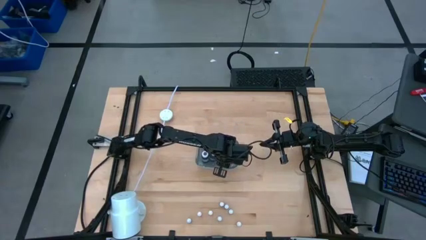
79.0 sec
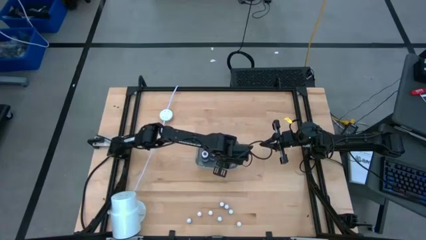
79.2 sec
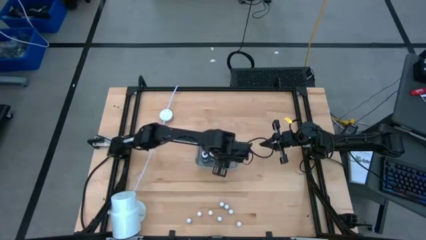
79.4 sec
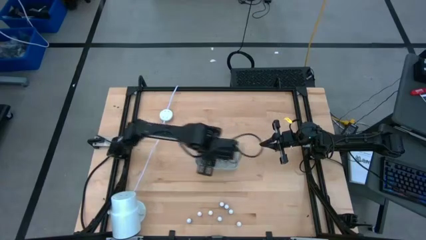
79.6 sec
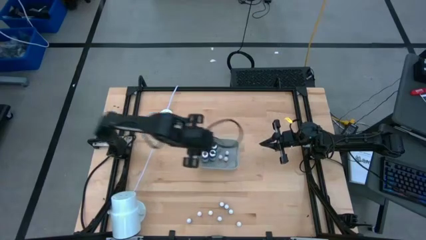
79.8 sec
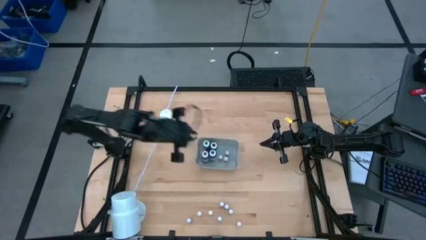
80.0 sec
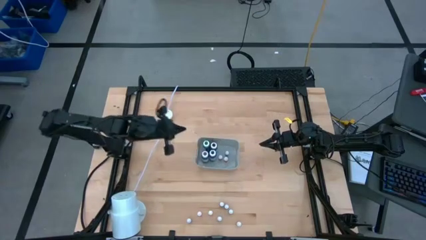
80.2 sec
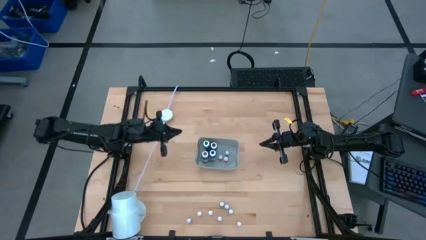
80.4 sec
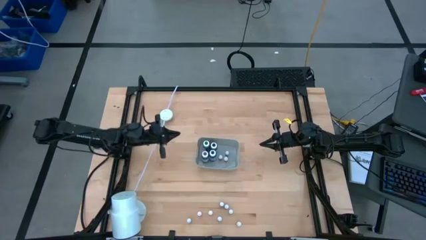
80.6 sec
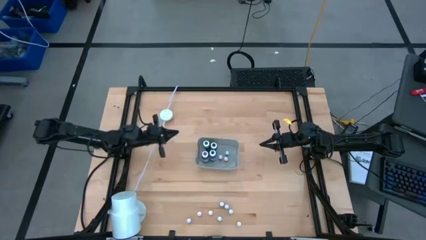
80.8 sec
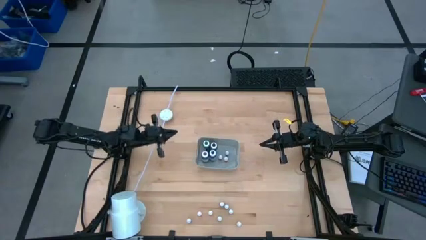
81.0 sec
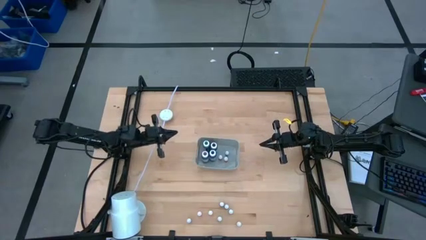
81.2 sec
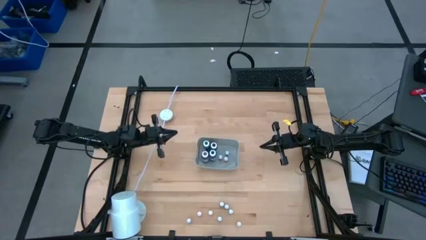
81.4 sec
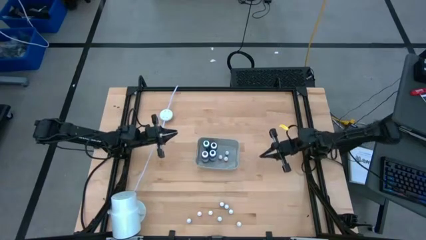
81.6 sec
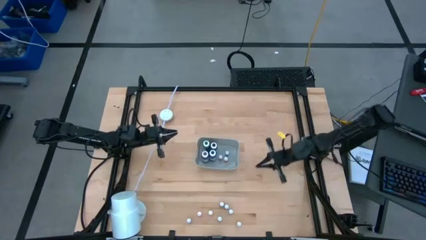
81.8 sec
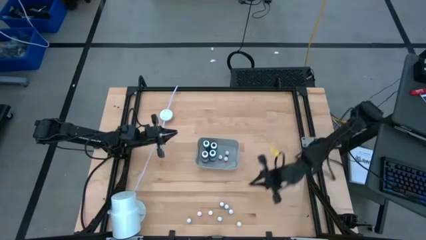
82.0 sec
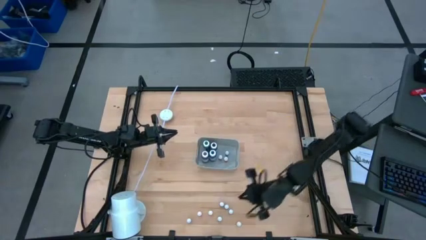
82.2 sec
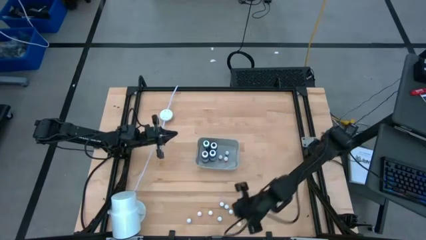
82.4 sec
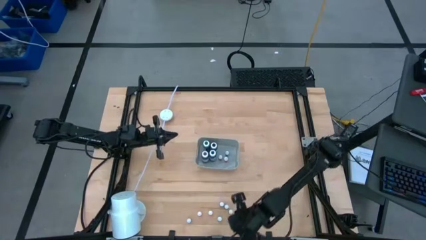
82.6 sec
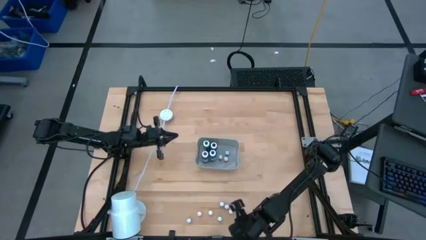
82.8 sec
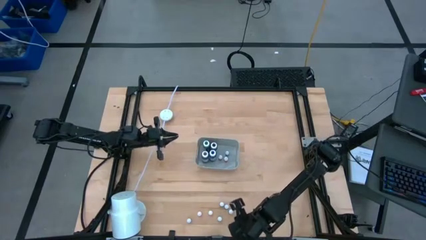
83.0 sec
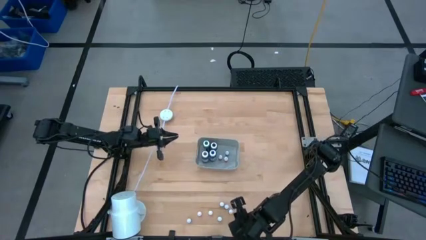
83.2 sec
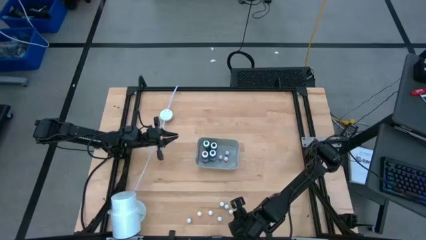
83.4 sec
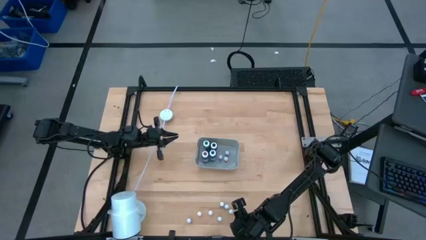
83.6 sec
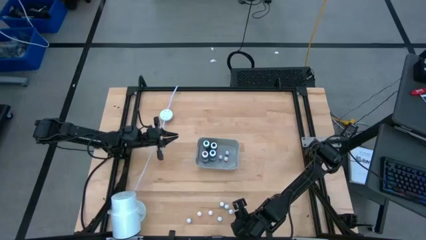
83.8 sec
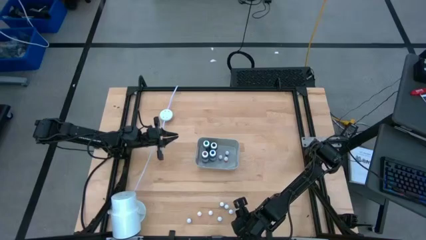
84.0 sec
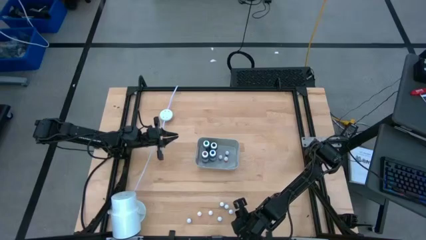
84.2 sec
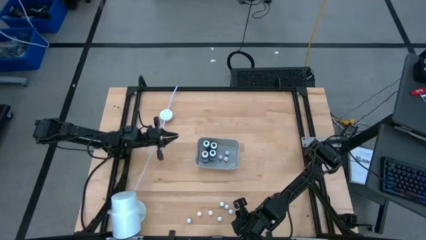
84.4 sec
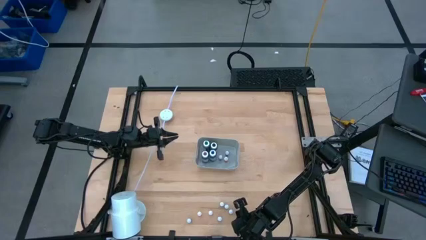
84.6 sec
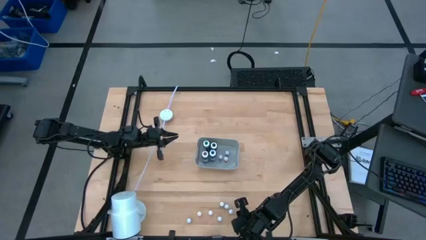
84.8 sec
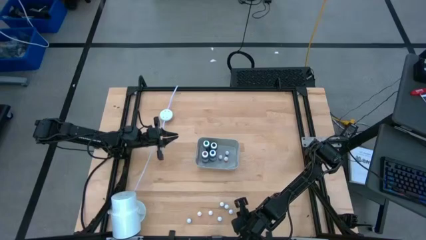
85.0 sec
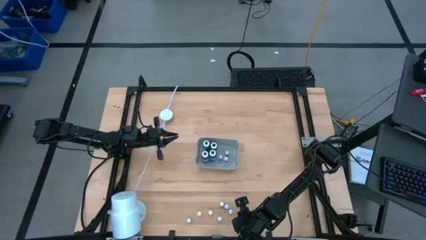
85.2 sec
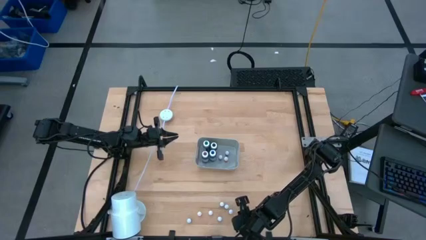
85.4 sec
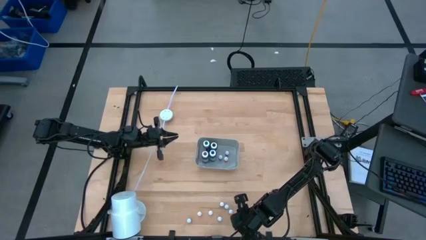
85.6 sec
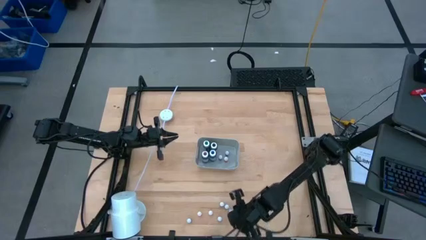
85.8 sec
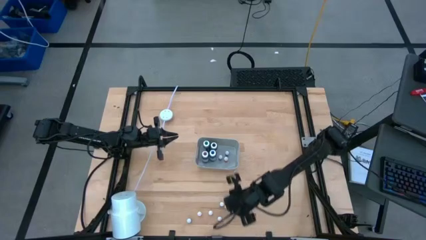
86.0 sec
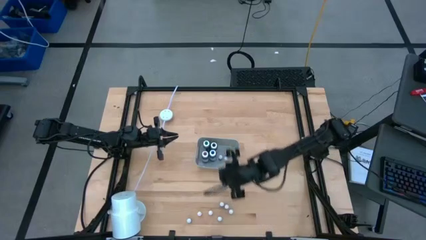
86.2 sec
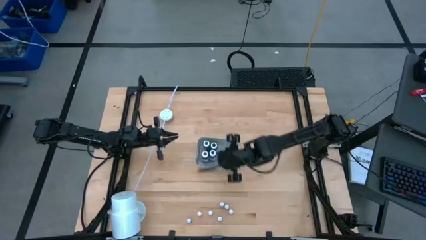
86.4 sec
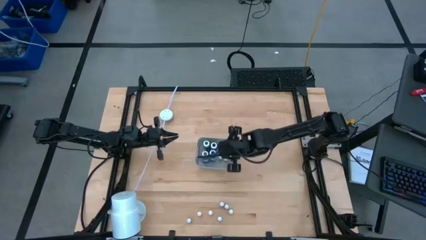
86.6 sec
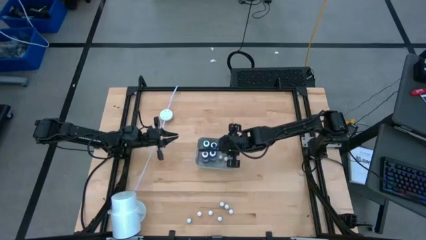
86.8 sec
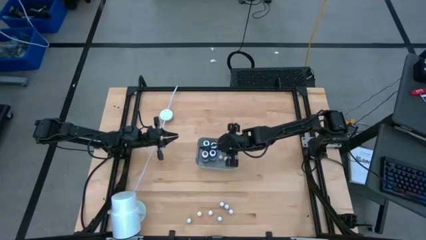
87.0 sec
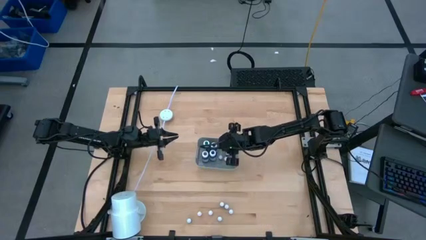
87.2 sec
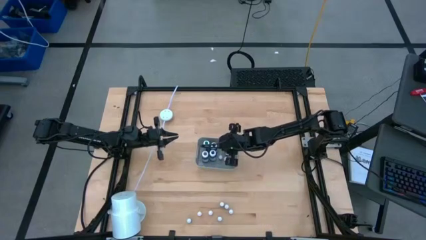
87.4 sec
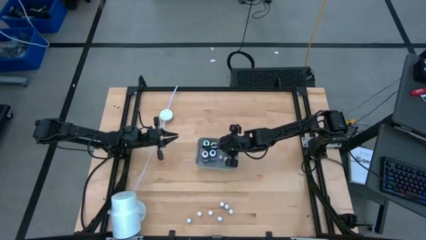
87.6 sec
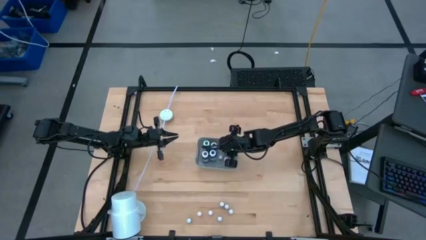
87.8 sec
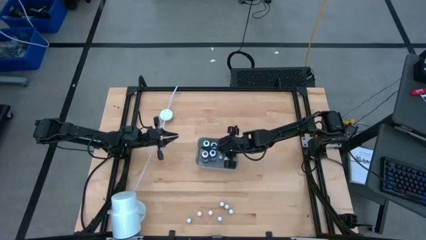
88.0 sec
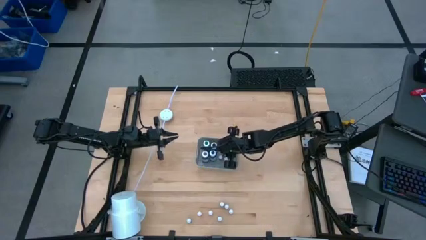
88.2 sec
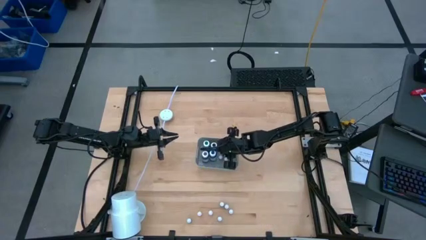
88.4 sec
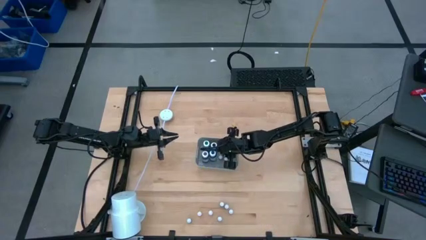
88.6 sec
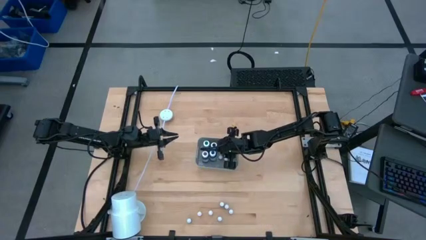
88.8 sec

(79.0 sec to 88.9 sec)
Task: Pick & Place food coloring
Put the small orange food coloring bottle into the gray container

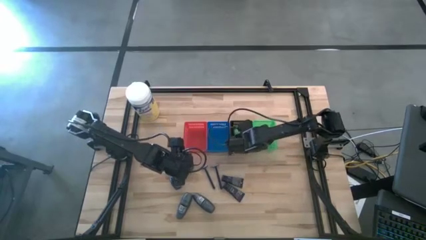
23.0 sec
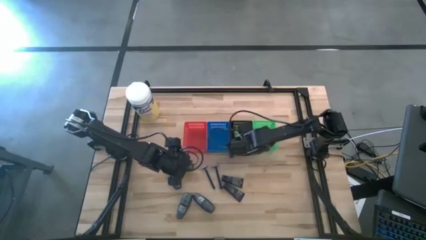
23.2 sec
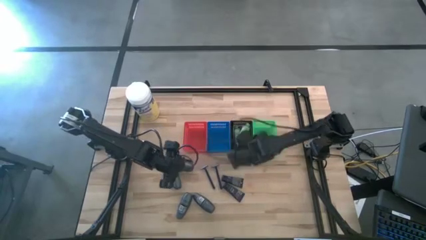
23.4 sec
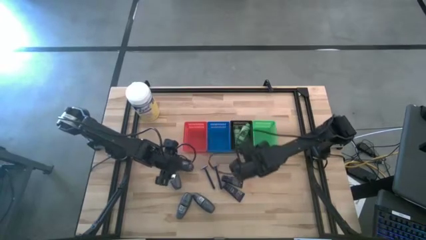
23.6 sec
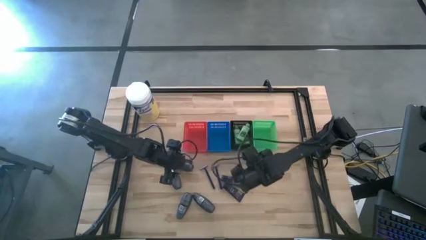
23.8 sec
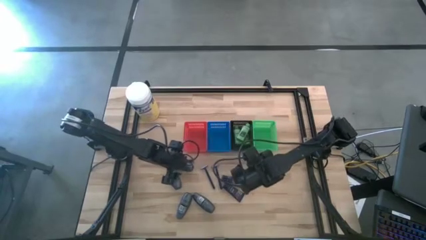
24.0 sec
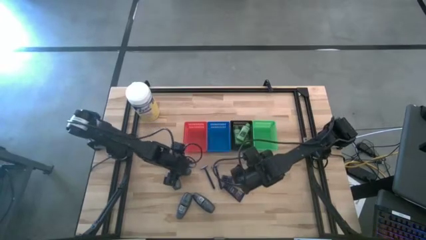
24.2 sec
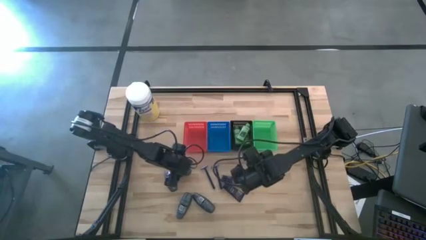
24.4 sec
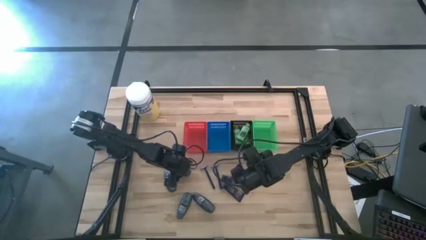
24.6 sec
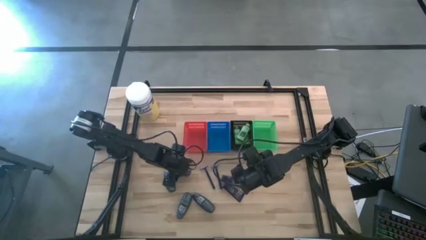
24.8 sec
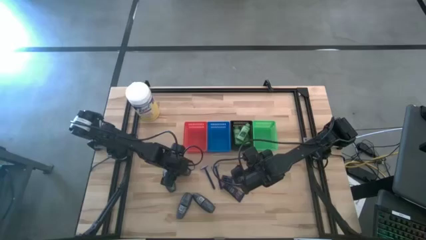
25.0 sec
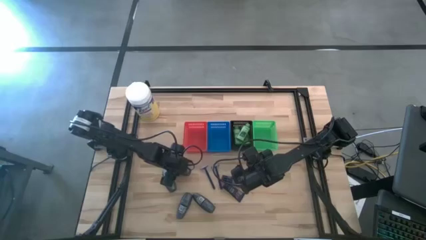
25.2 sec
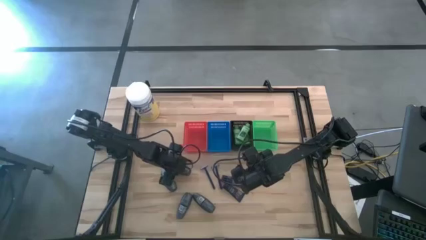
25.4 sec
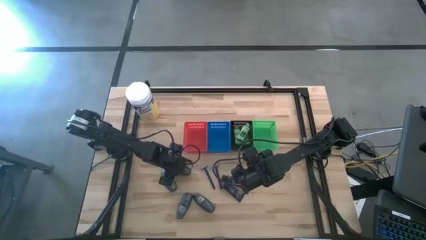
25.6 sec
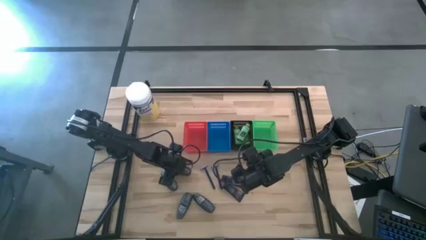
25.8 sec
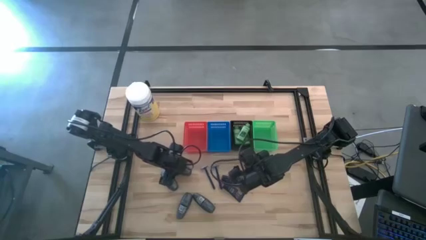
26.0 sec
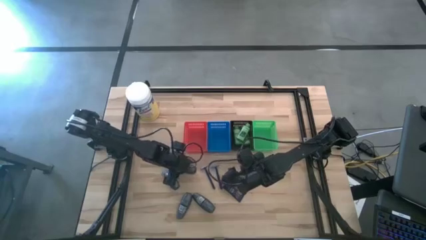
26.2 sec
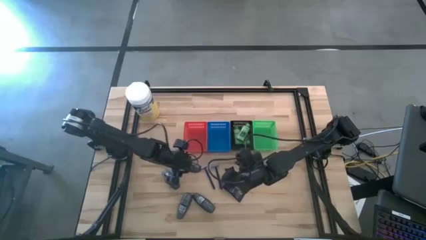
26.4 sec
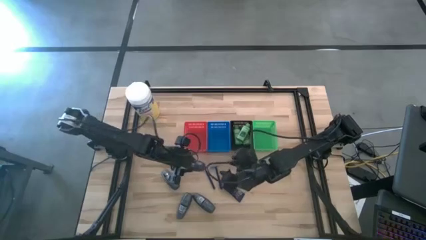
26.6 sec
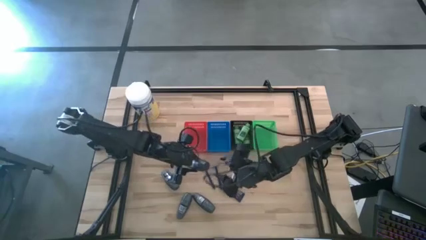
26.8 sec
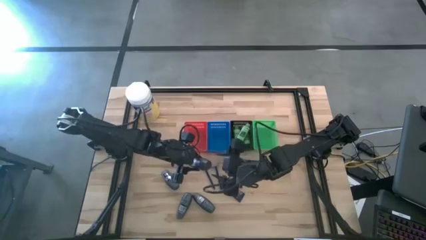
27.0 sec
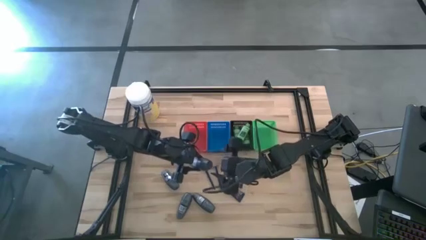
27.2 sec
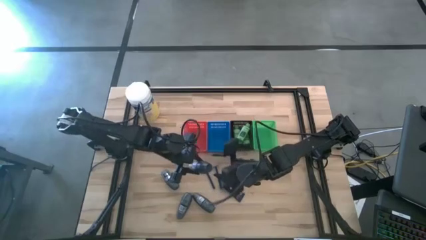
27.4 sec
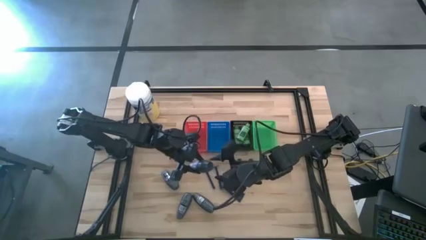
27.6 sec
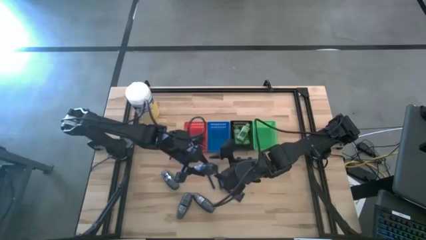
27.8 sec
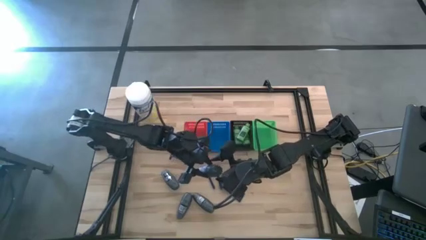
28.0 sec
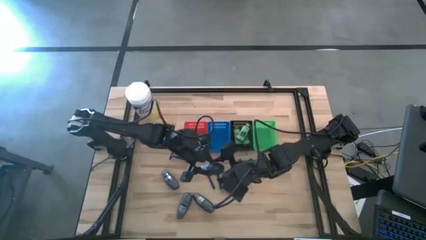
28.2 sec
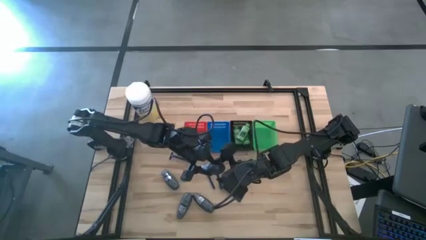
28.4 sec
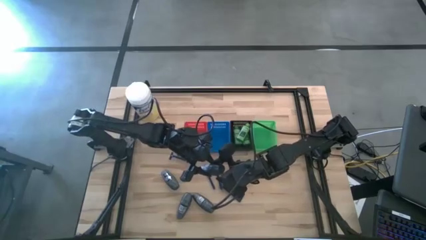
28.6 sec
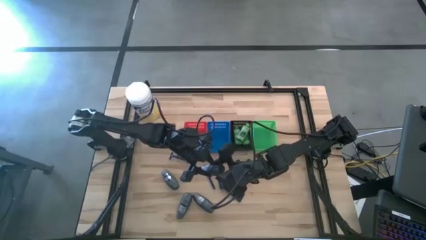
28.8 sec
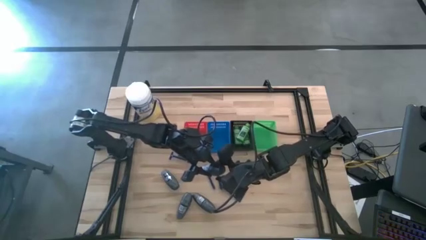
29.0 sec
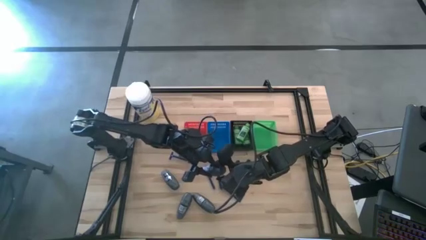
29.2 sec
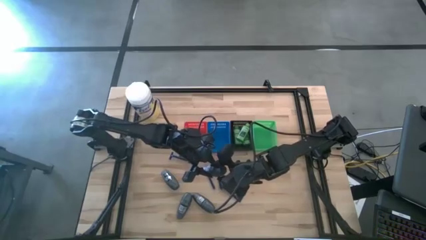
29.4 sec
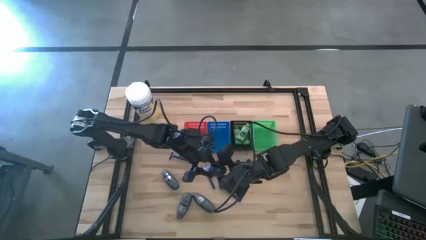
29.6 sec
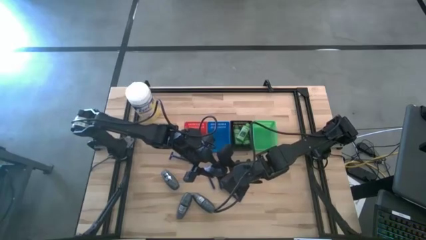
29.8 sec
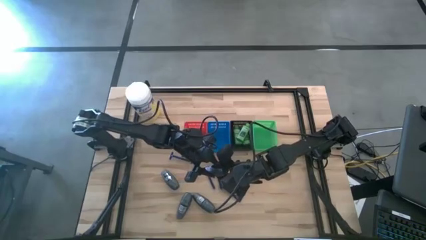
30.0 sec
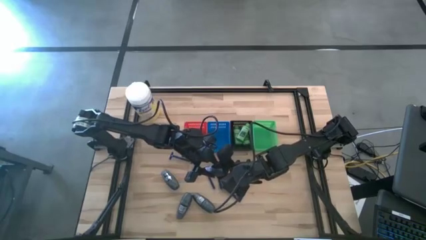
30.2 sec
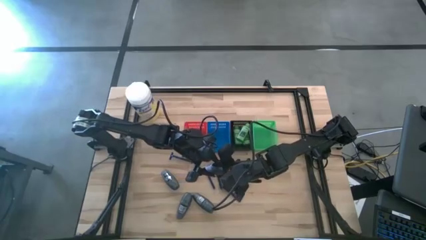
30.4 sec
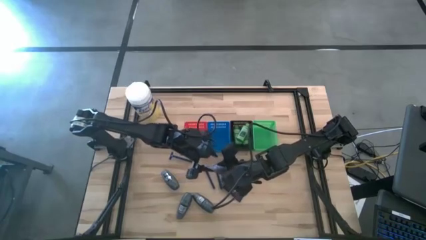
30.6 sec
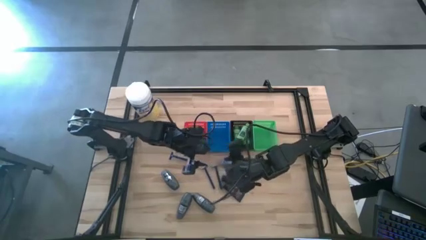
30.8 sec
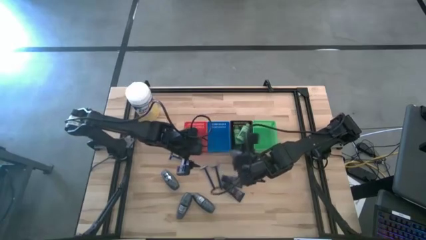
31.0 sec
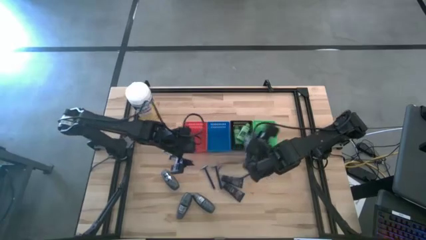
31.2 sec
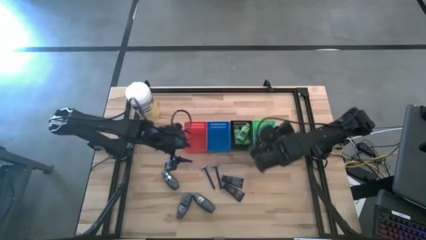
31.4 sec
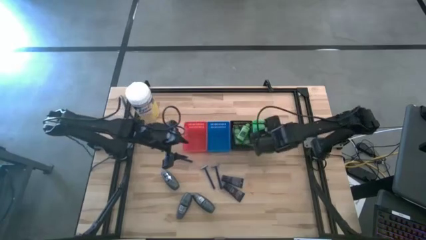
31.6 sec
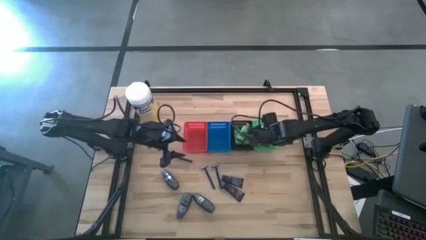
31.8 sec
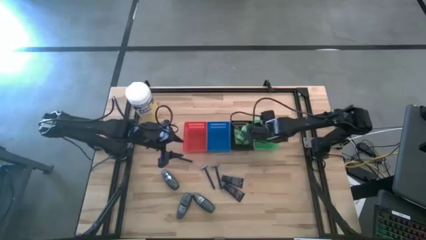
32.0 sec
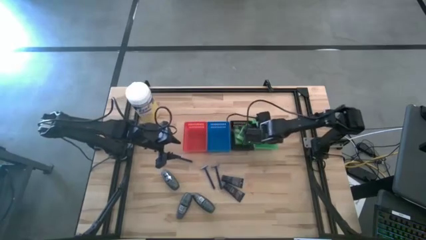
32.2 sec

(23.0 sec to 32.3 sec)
Task: Pick & Place Travel size toiletries
Put the deodorant into the green basket
